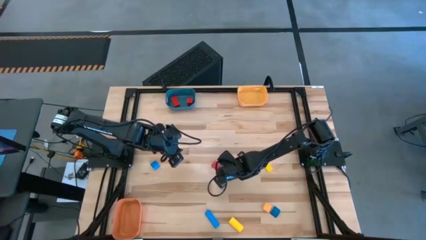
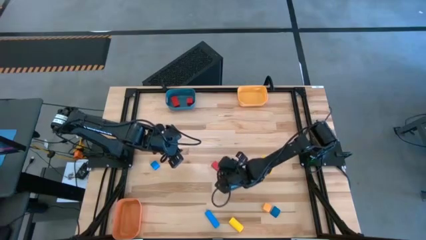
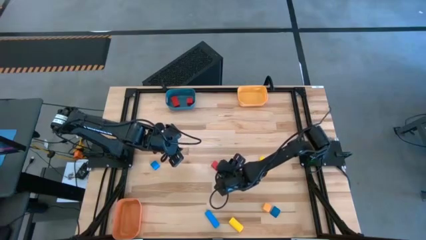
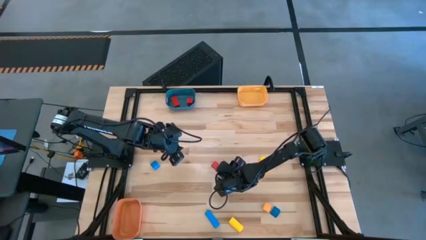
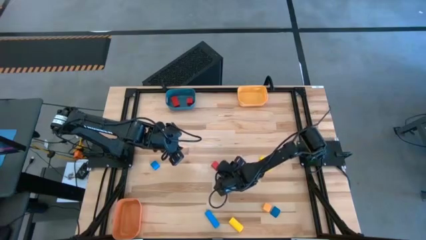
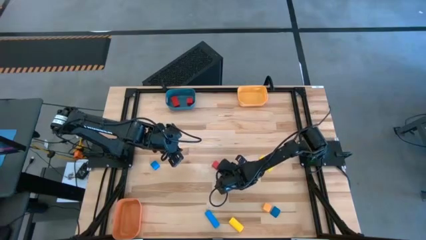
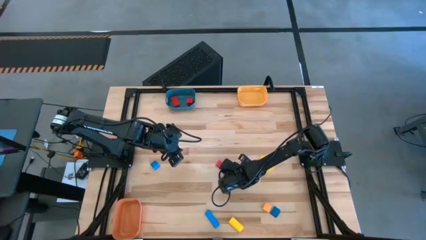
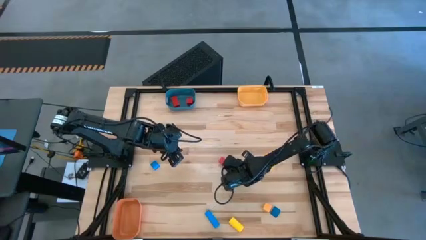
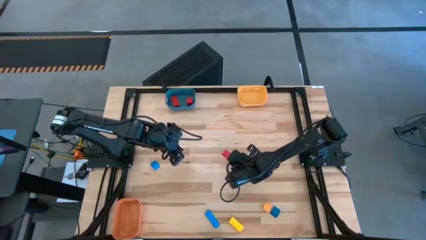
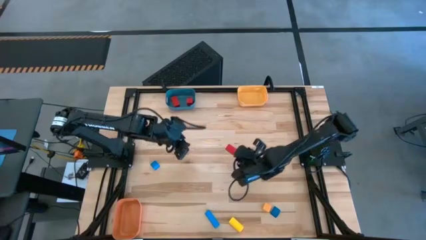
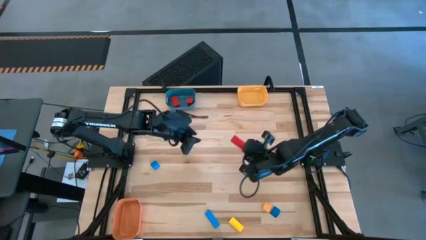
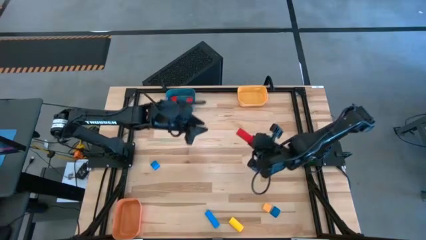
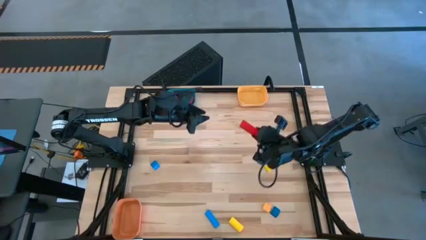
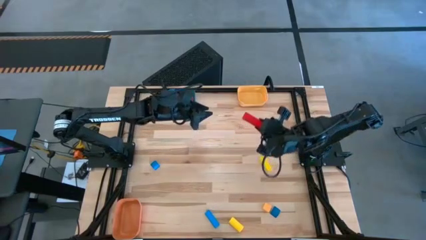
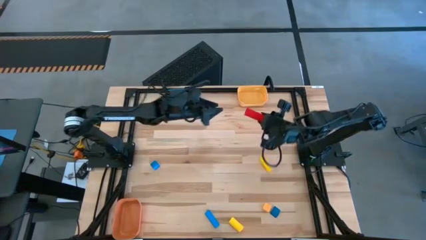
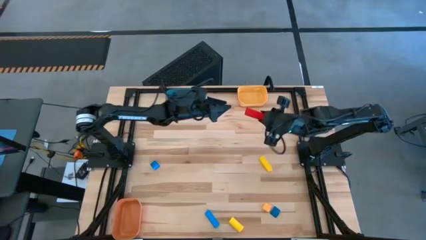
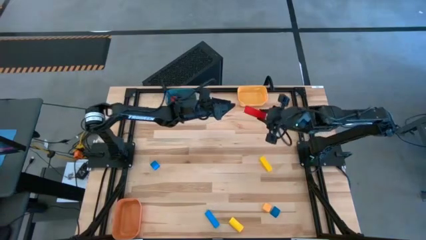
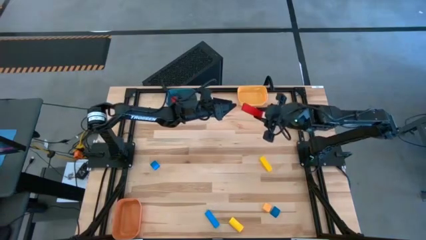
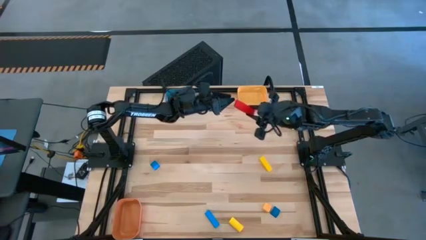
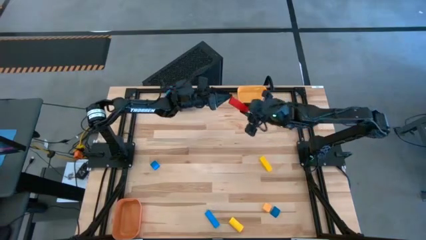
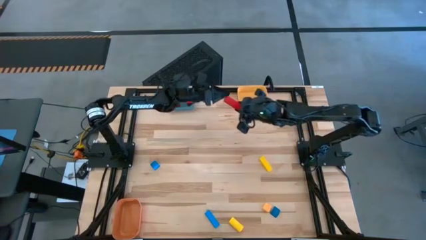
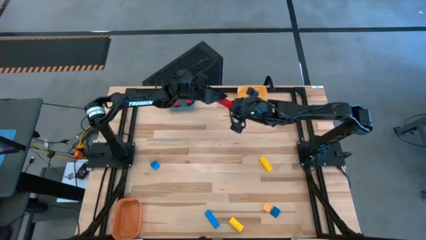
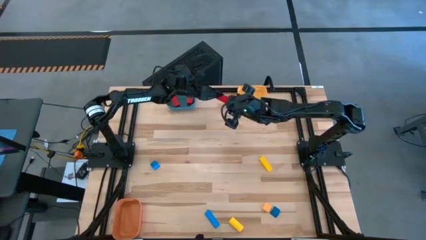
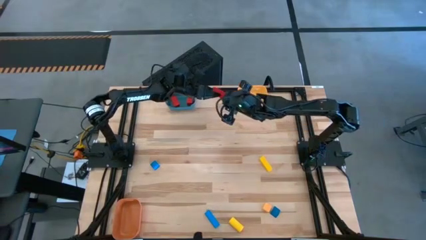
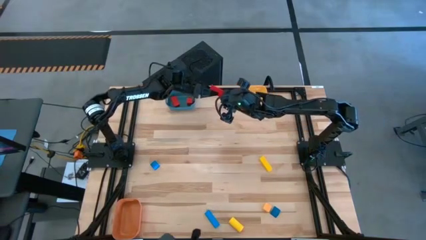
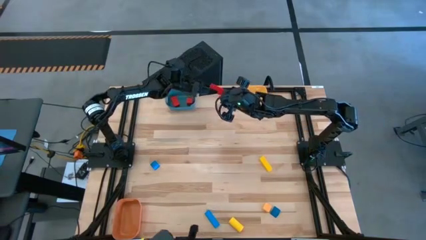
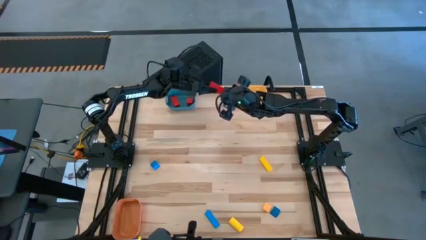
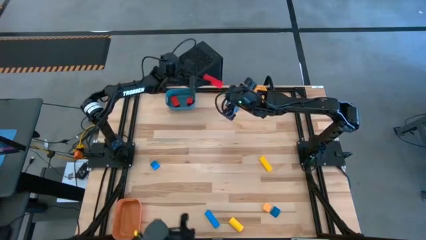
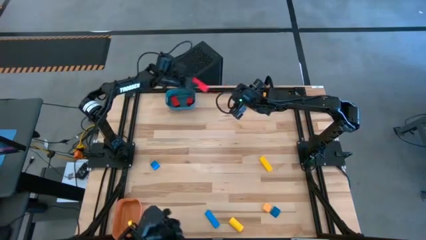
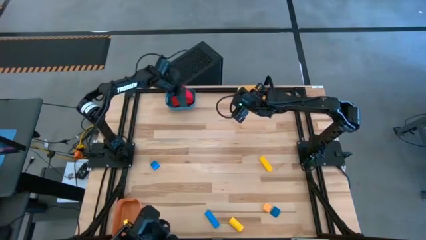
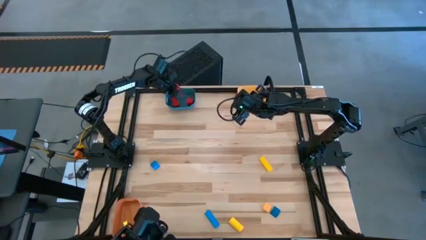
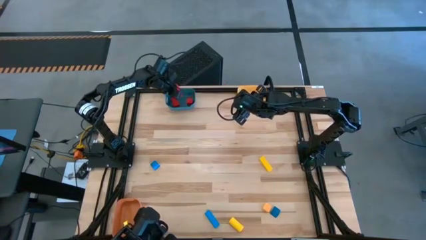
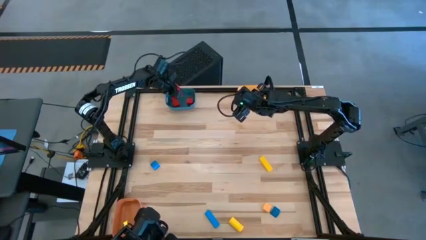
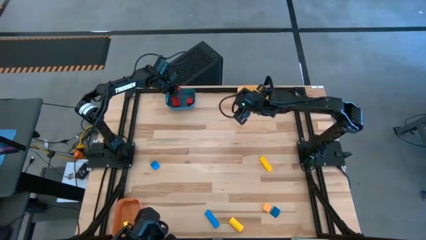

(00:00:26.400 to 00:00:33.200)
Task: Sort & place blocks by color
Put the red block into the blue bin

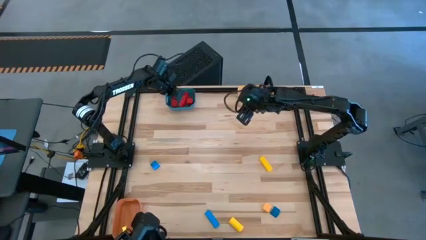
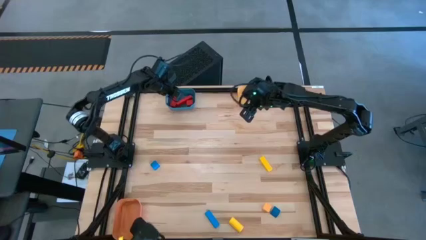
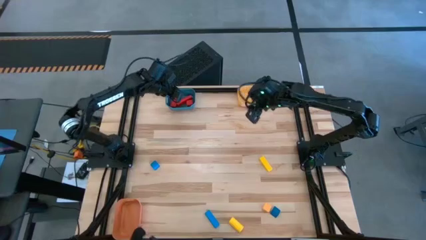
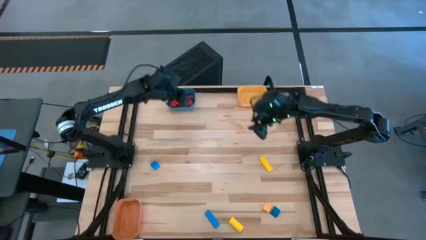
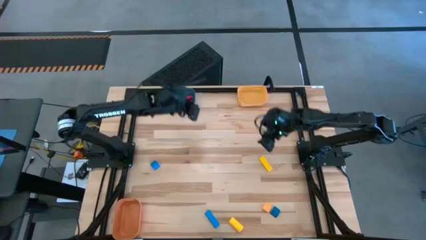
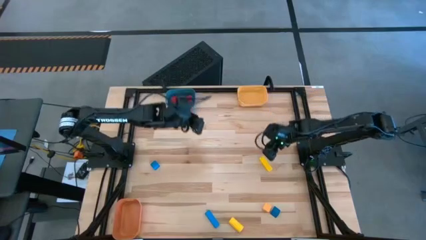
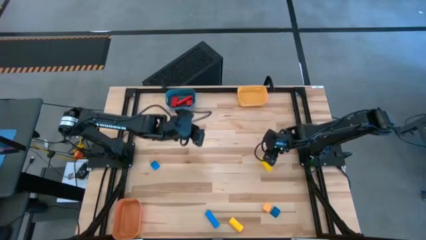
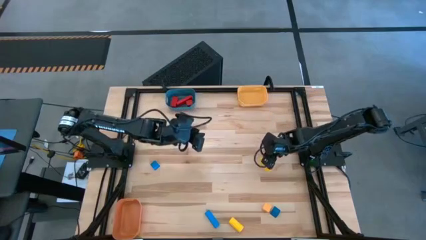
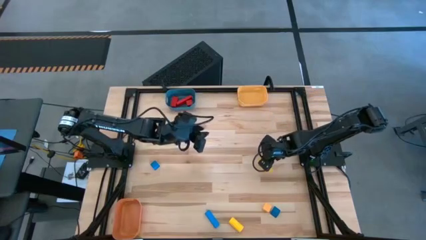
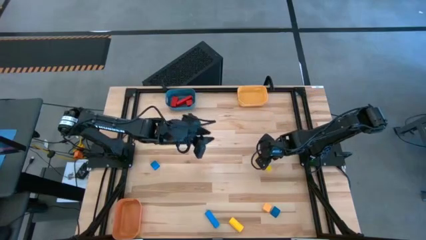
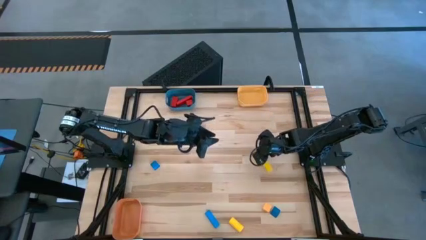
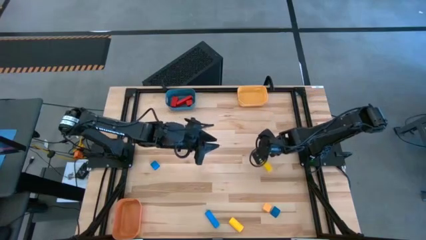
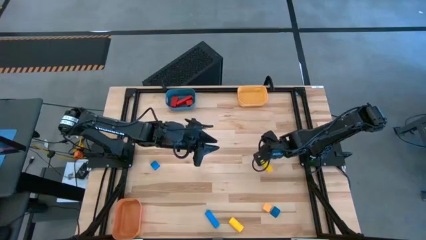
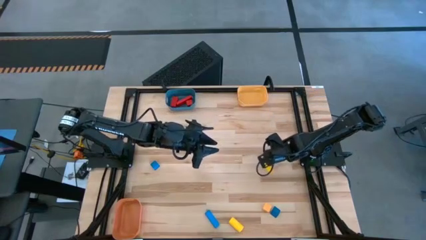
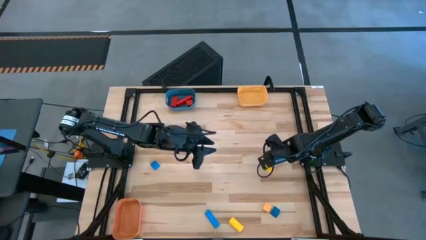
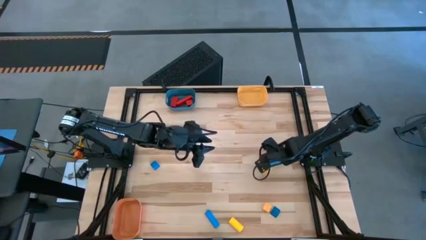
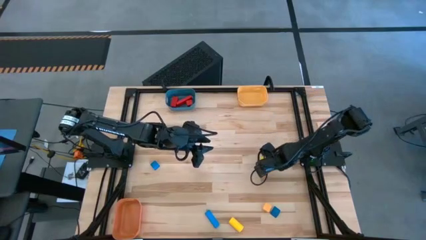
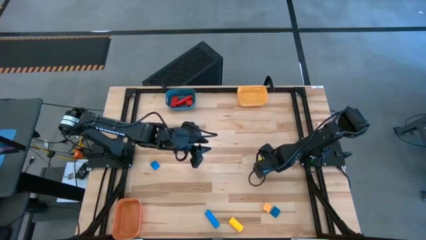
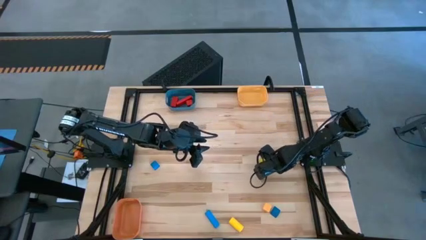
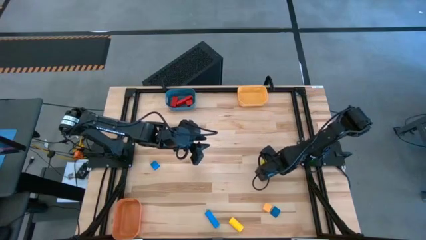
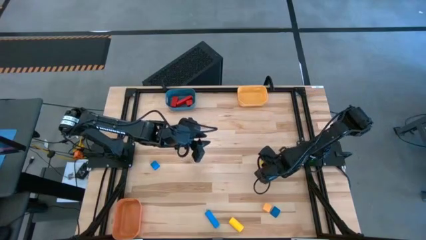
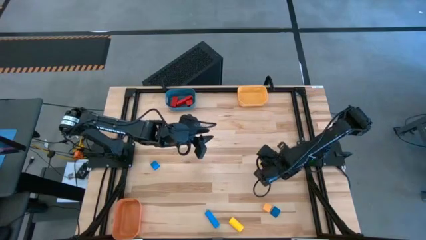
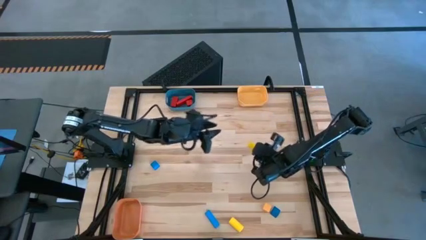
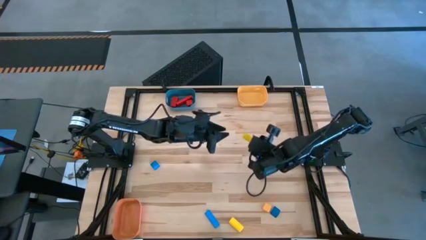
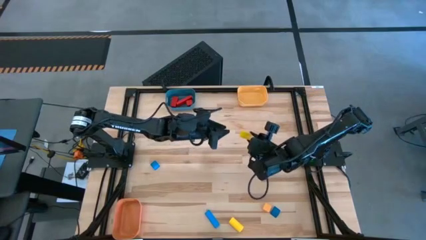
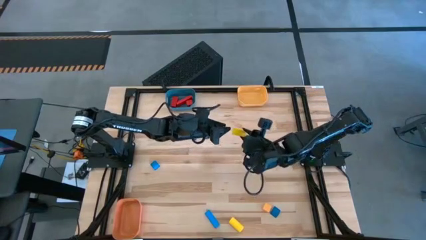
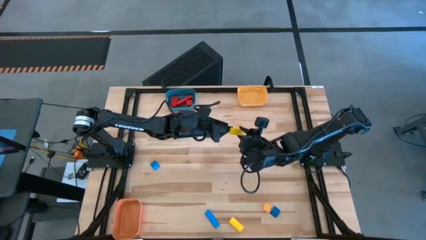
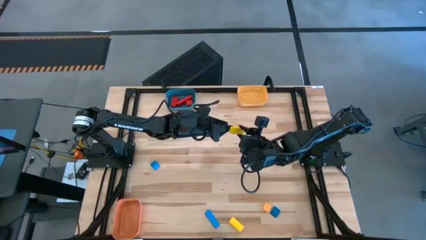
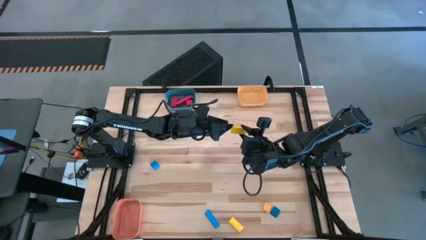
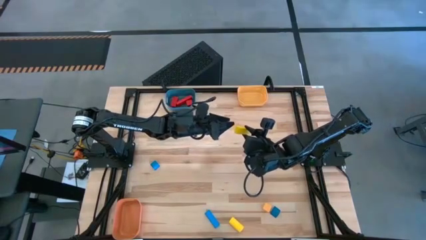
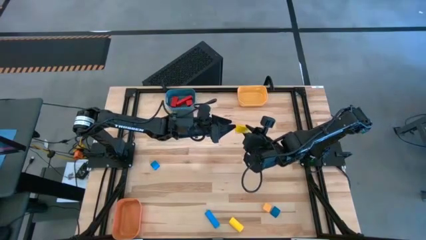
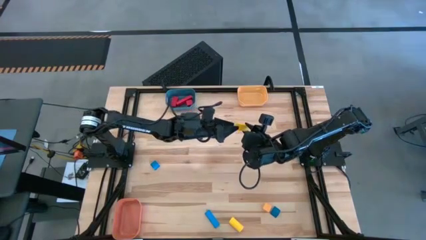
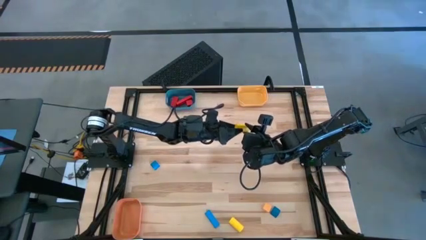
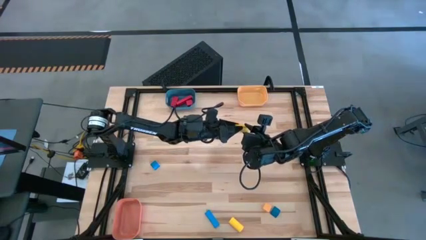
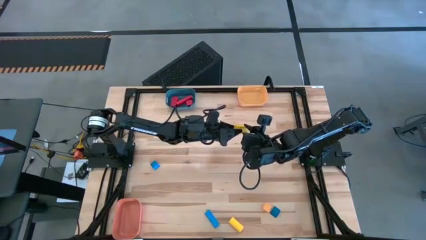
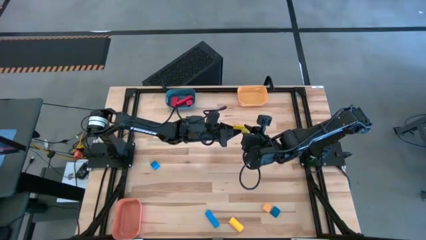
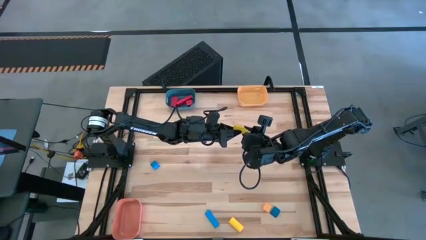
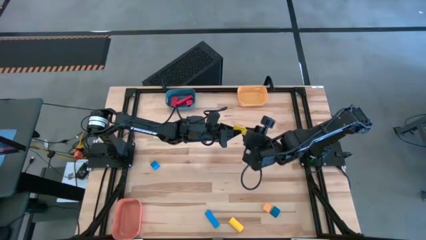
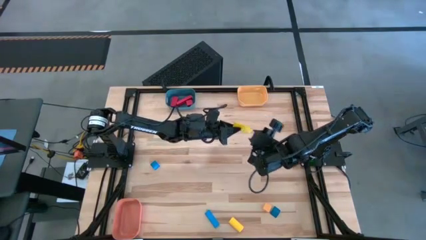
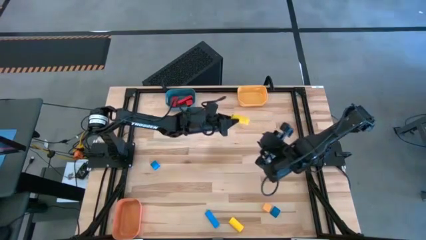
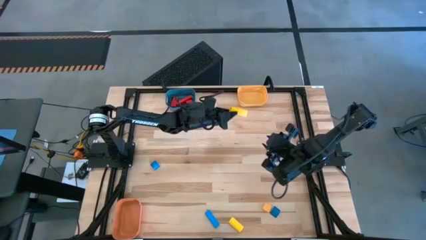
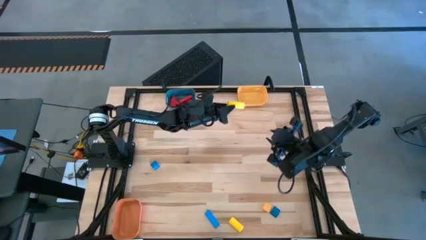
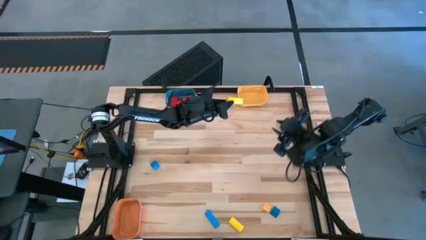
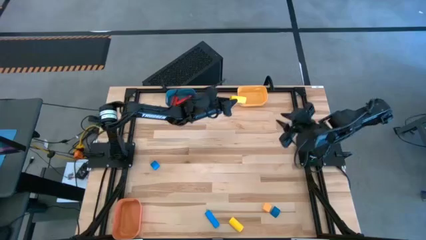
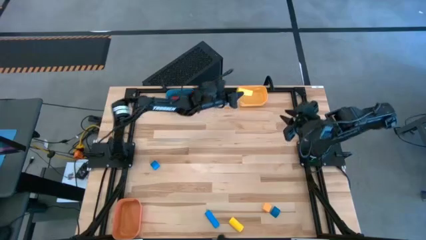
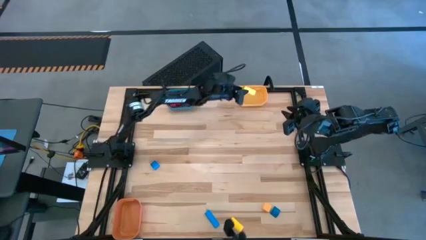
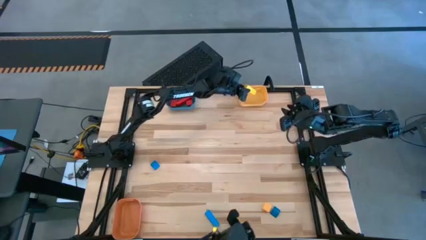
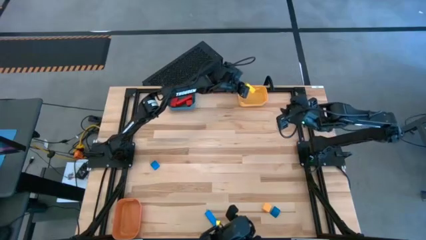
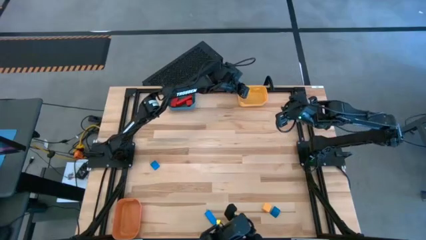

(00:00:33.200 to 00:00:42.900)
Put the top yellow block into the yellow bin
